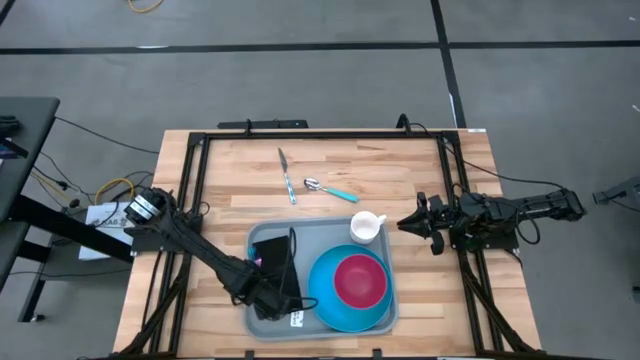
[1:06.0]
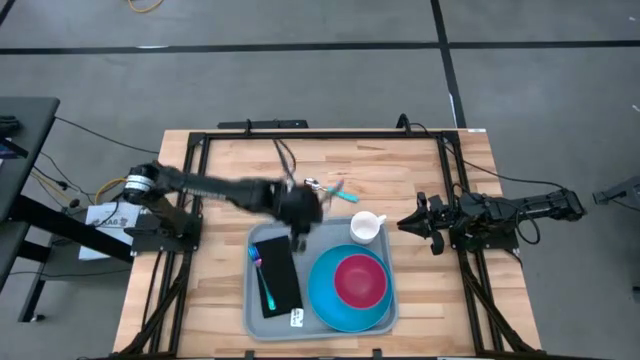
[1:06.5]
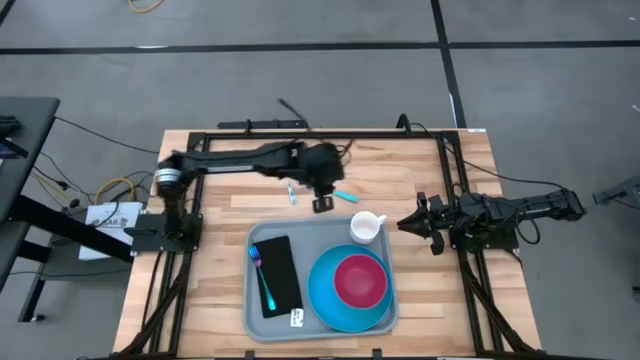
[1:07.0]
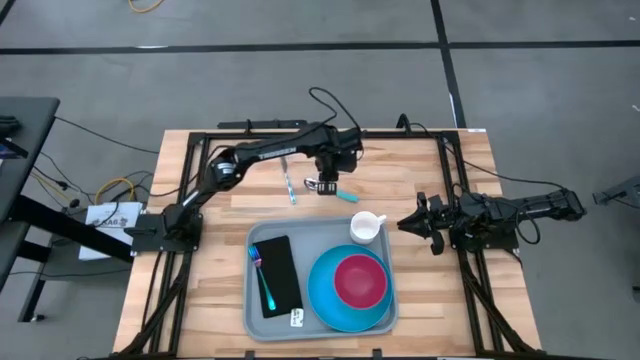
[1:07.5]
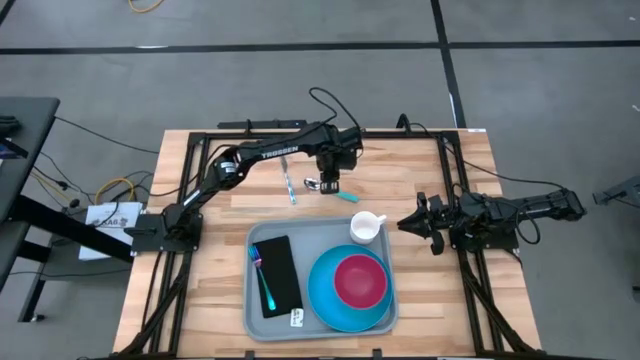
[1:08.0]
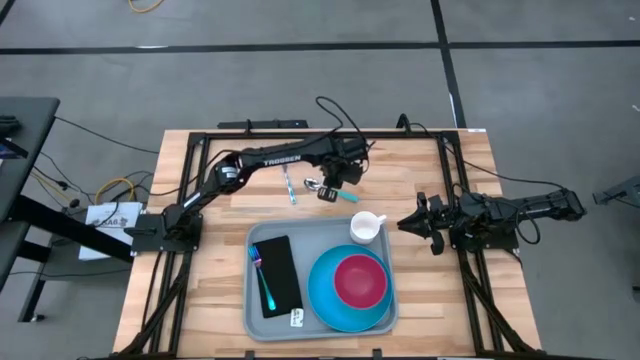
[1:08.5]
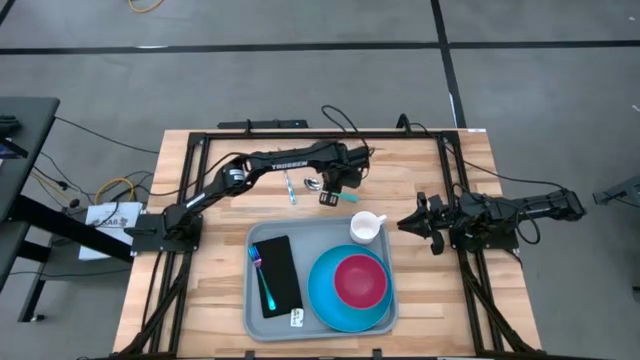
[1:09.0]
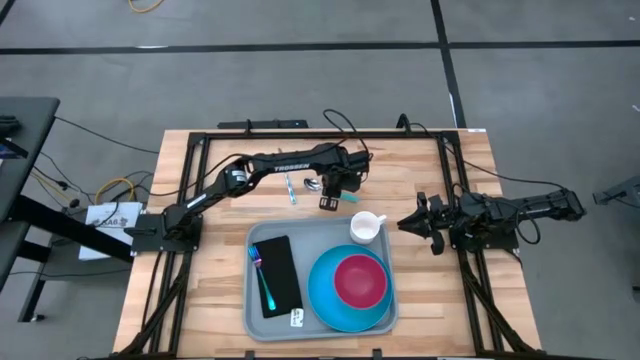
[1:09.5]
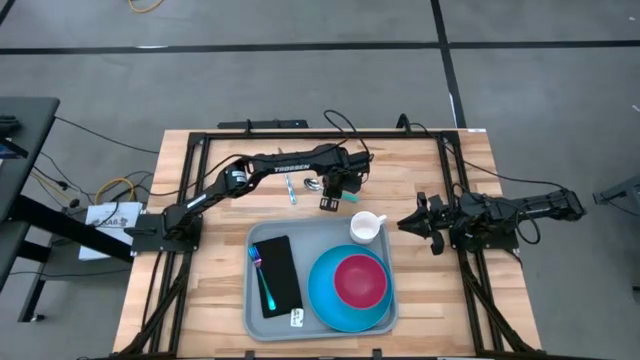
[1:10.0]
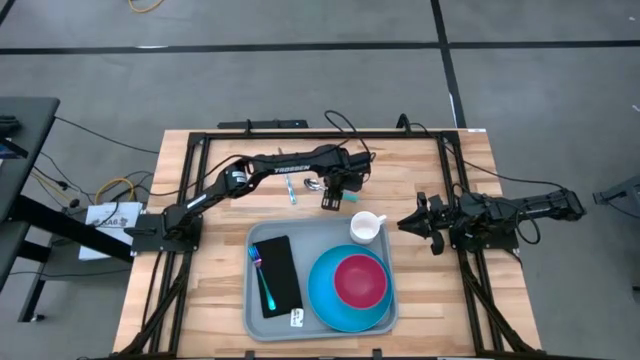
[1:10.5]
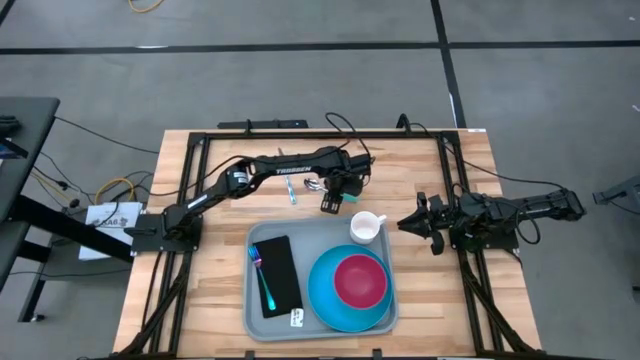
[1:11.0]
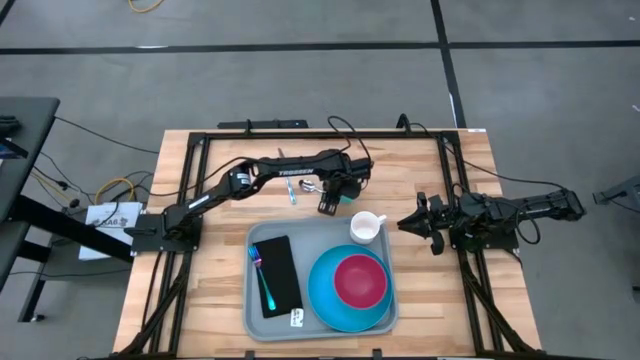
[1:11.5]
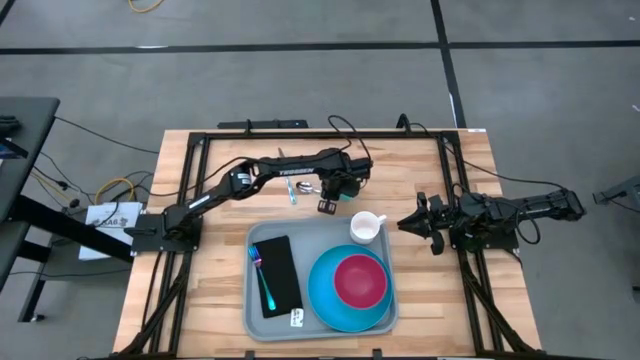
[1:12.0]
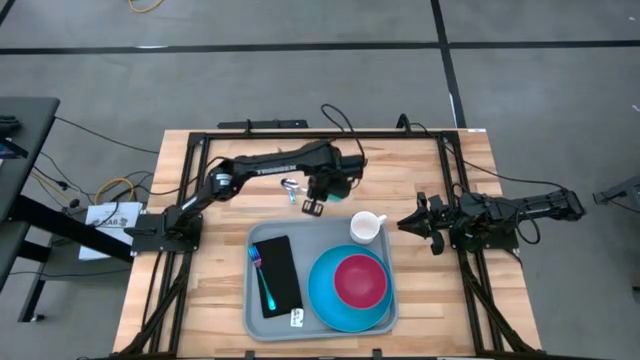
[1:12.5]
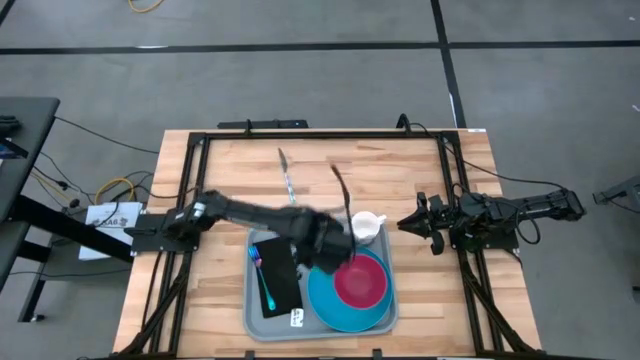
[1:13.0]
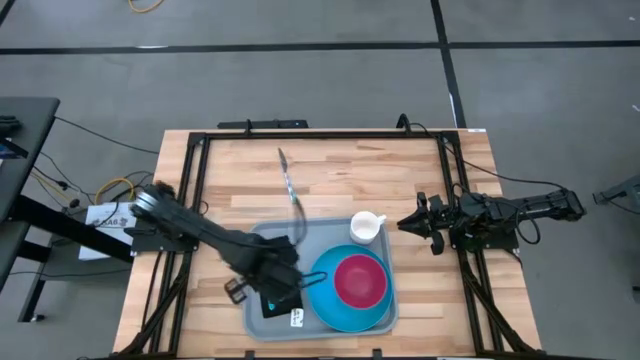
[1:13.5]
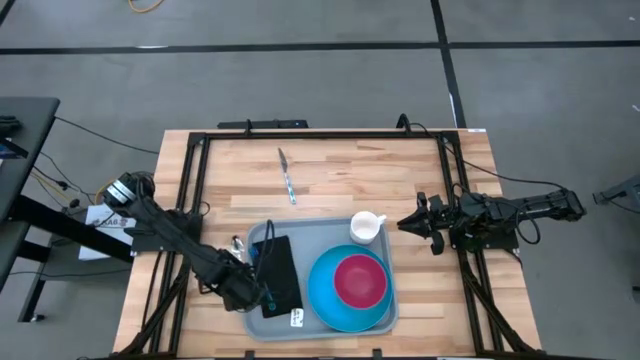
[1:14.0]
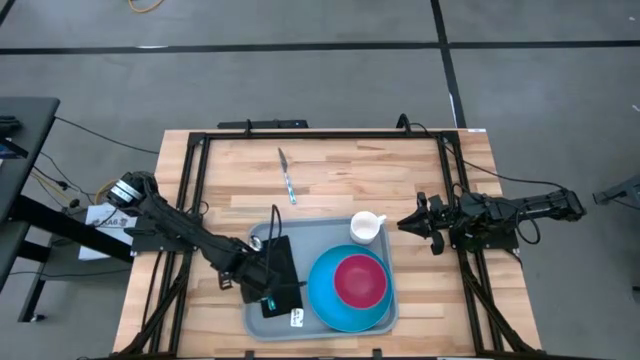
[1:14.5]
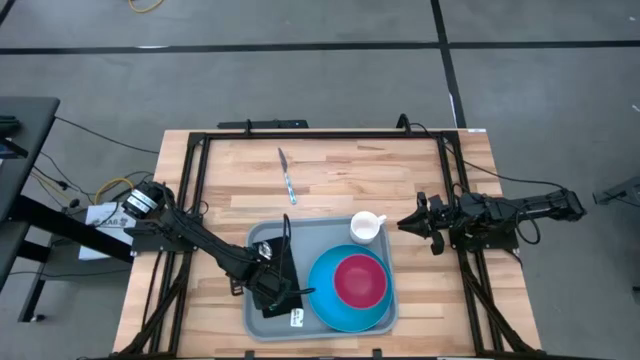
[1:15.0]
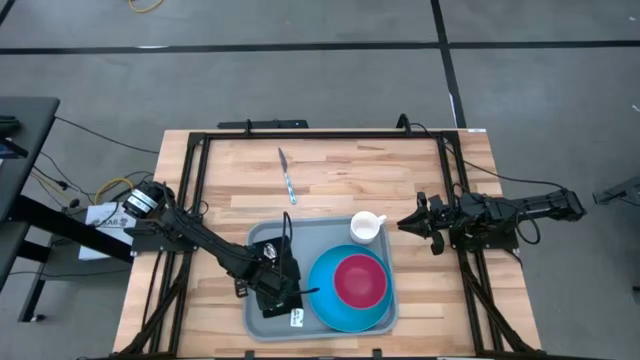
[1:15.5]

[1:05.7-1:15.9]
Task: Set up tray
Put the blue spoon on the black napkin to the right of the blue fork

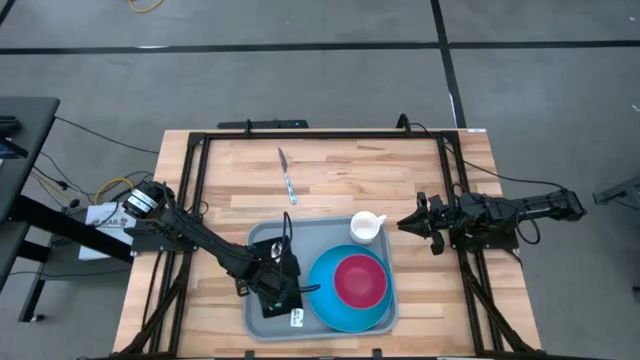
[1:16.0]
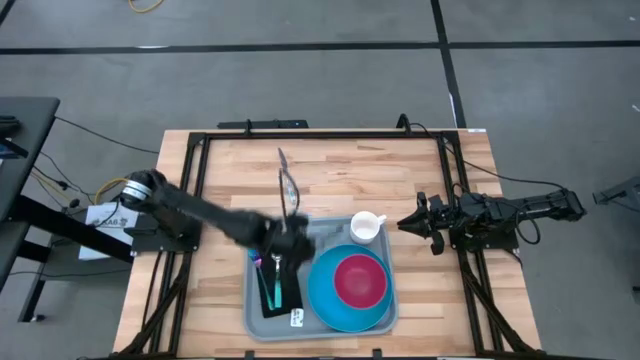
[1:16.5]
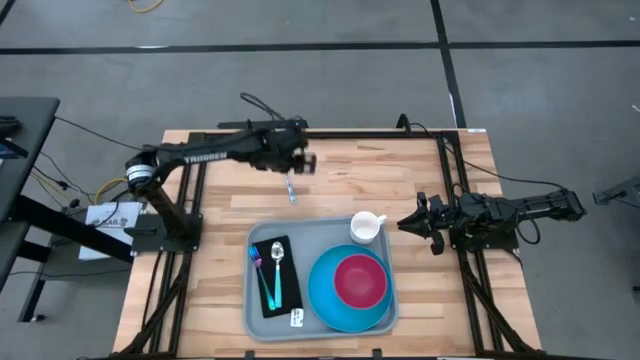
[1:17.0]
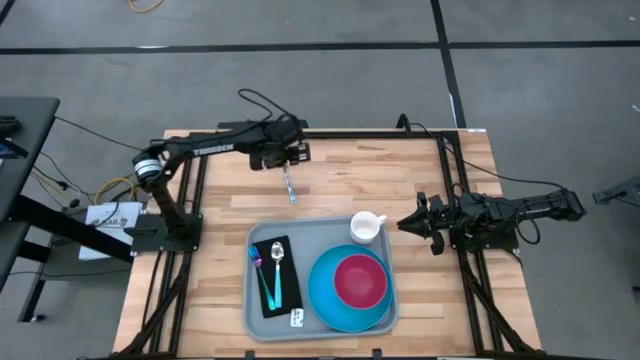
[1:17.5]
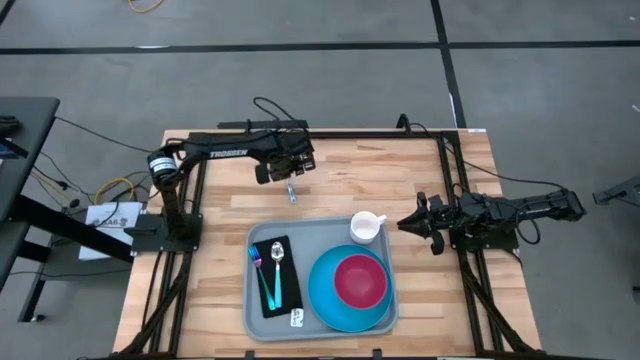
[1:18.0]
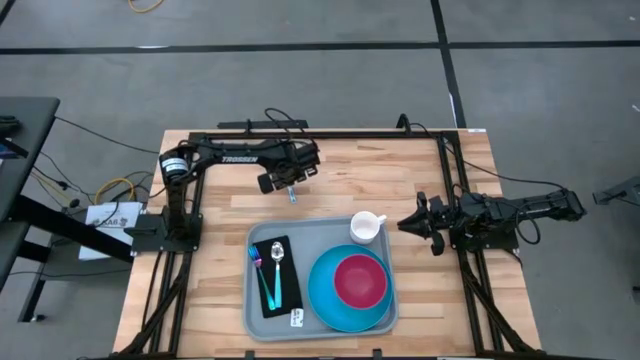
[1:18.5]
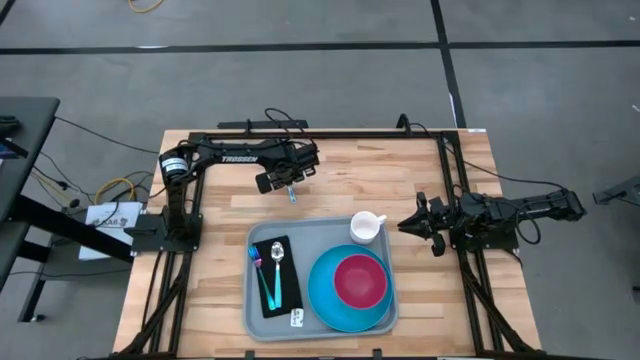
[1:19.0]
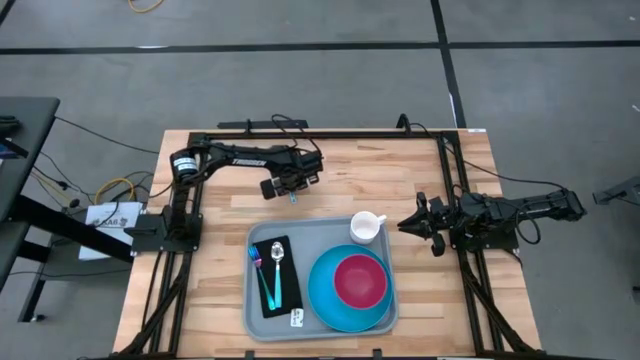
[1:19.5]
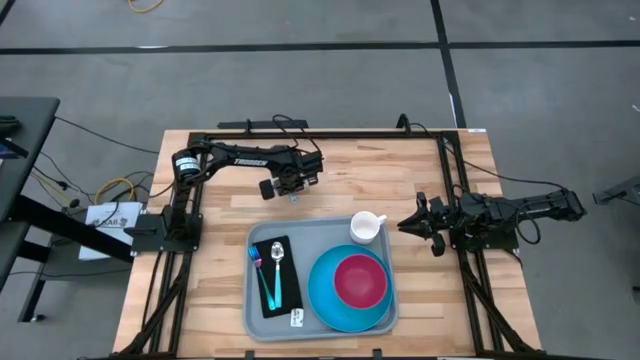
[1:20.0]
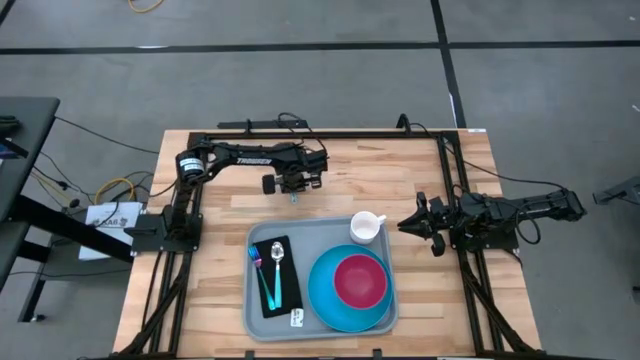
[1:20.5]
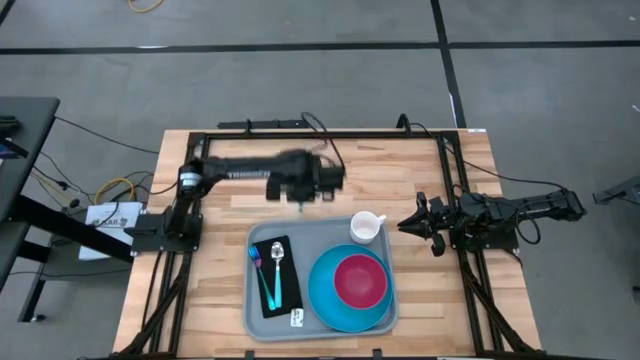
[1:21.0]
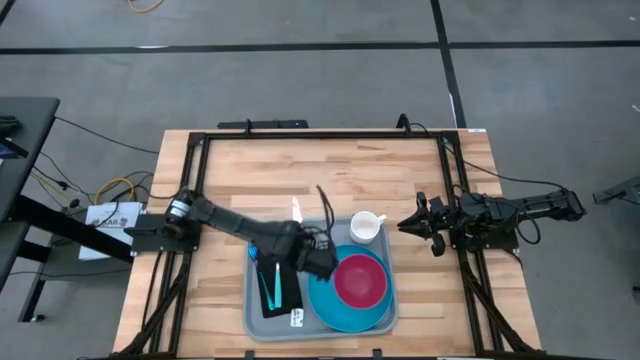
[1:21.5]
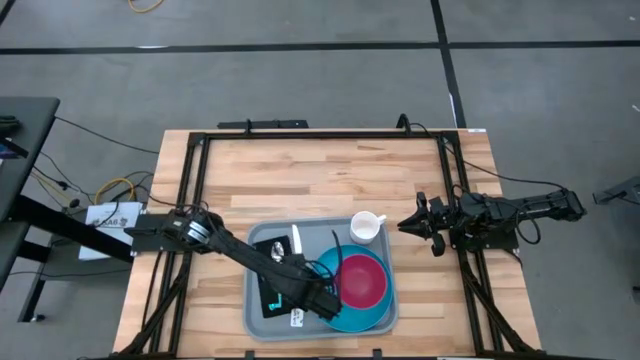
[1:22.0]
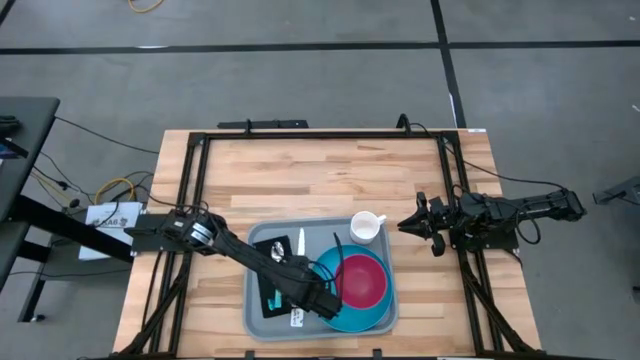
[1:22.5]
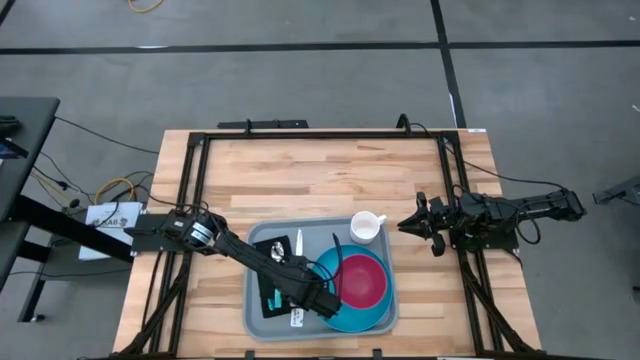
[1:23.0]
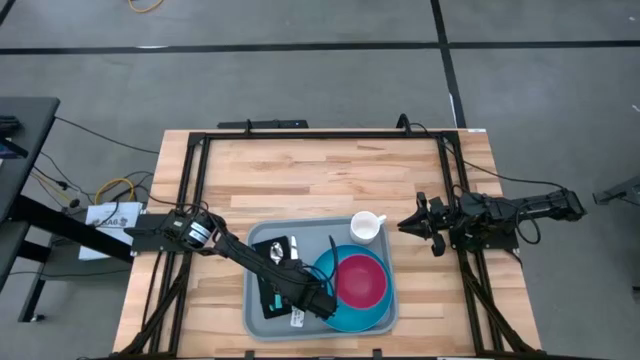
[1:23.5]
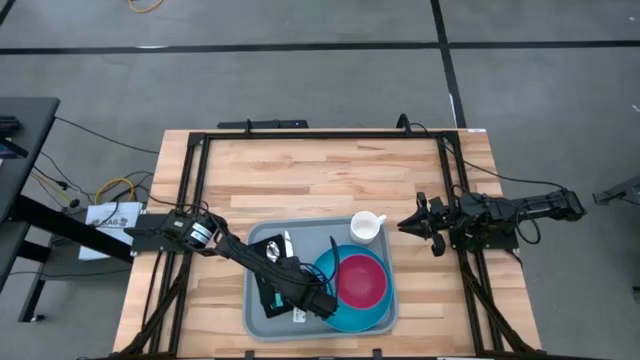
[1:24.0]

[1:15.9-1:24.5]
Put the blue knife on the black napkin to the right of the blue spoon

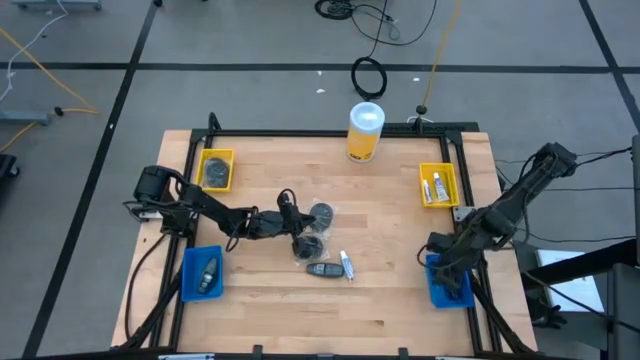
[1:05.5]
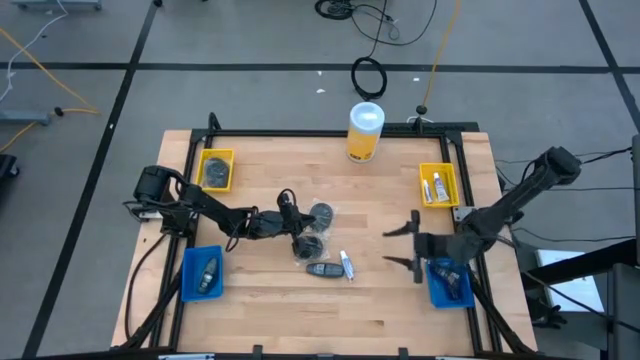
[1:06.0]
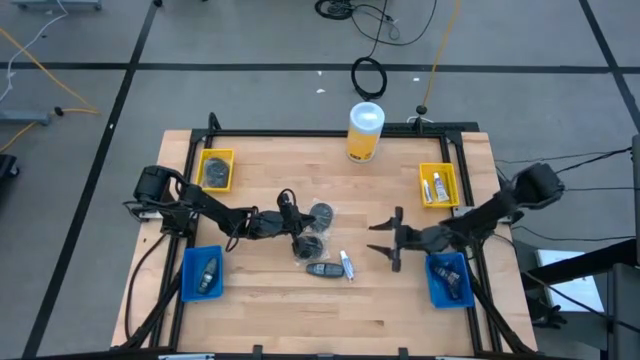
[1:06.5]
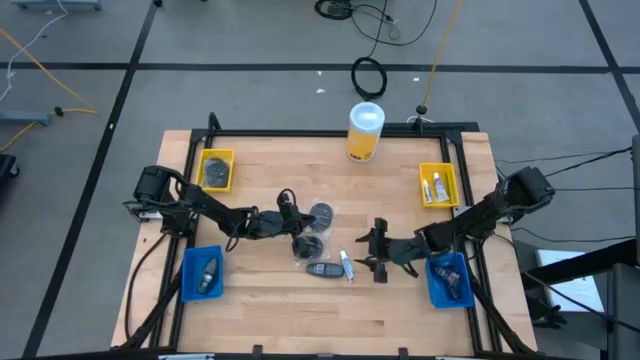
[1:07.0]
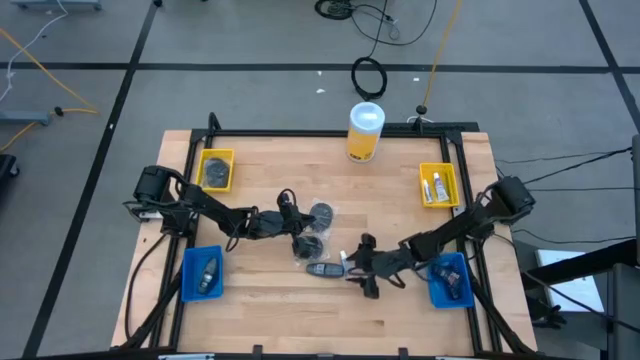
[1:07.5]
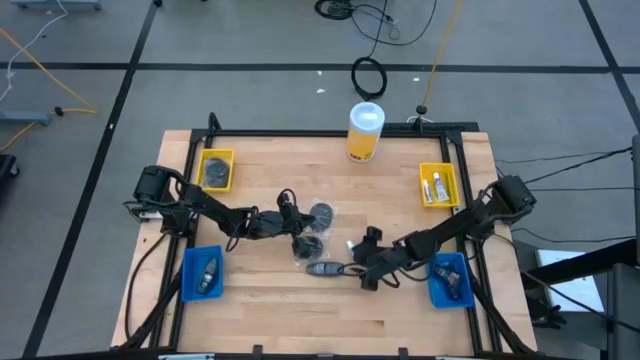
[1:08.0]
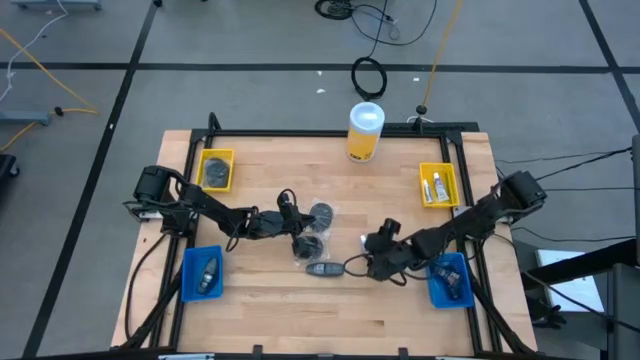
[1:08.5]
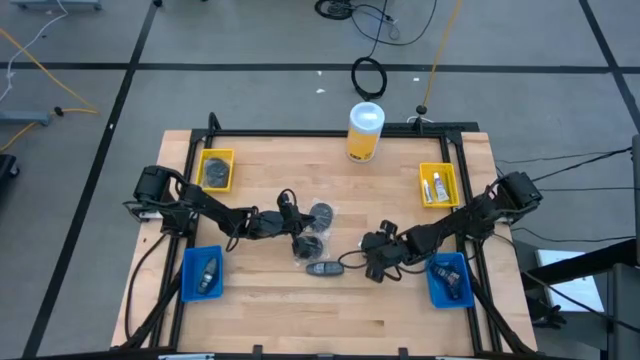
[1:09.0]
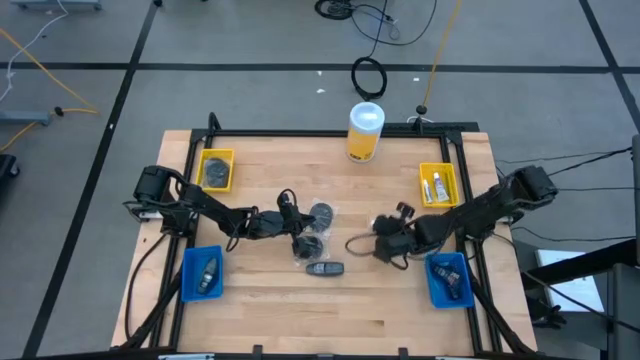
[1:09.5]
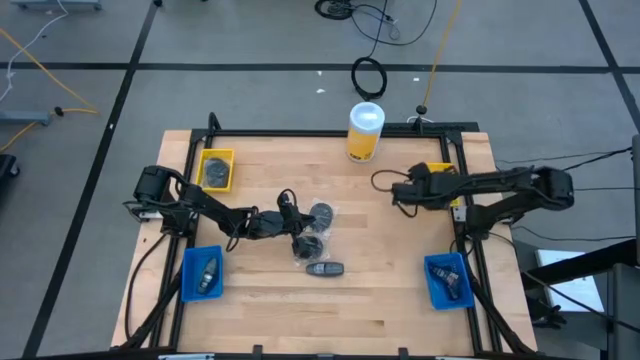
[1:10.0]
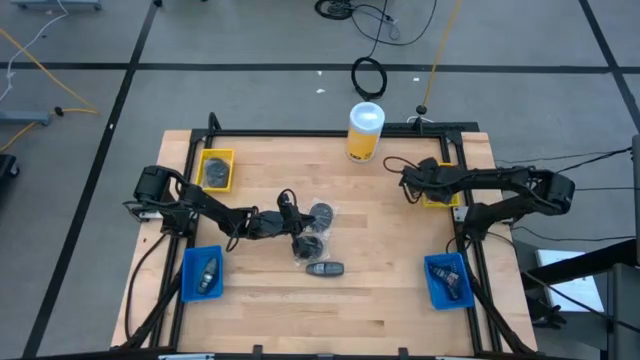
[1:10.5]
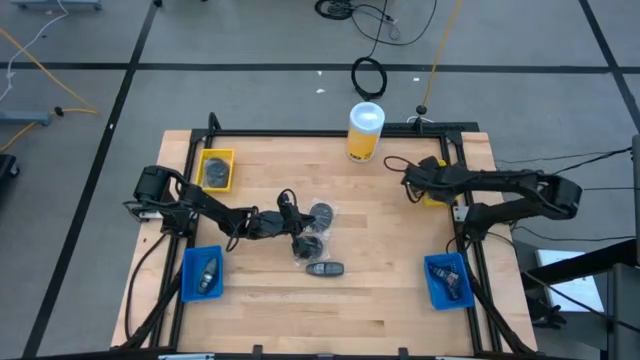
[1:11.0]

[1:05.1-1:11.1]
Task: Pick & Place Travel size toiletries
Put the white toothpaste into the right yellow bin
